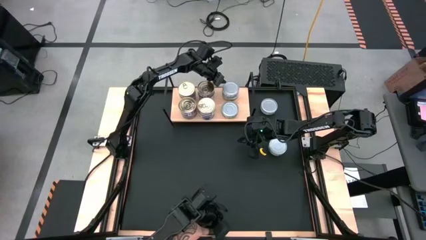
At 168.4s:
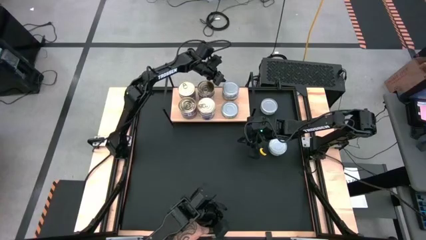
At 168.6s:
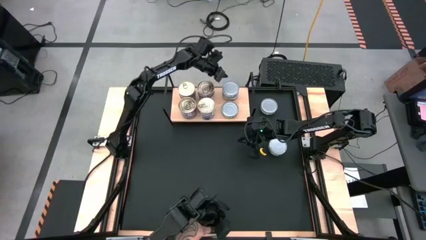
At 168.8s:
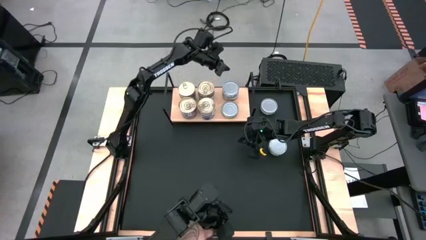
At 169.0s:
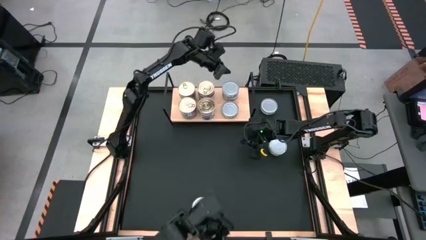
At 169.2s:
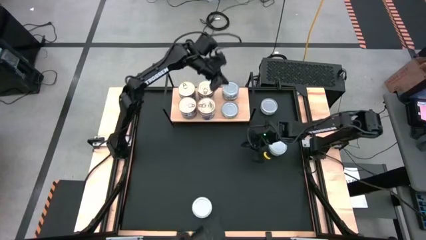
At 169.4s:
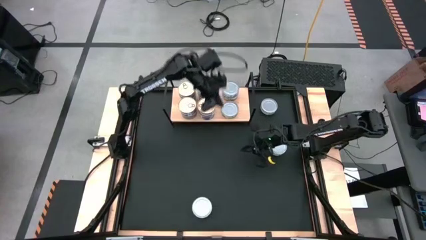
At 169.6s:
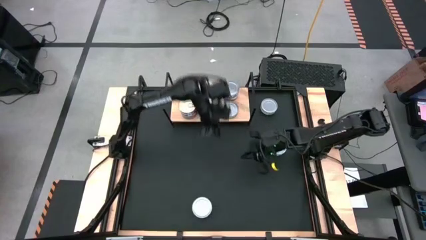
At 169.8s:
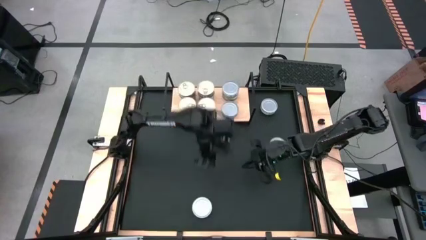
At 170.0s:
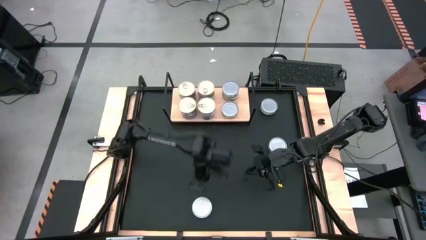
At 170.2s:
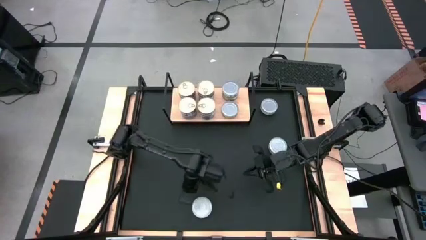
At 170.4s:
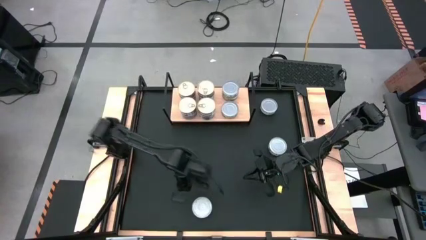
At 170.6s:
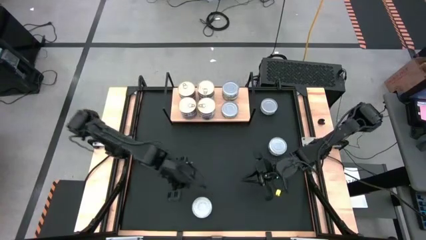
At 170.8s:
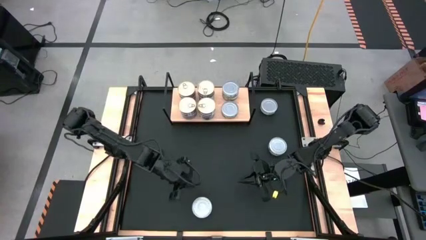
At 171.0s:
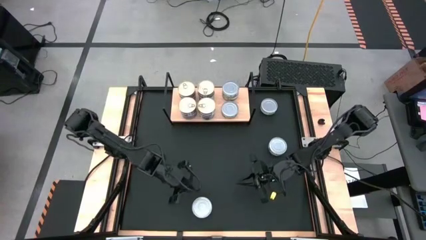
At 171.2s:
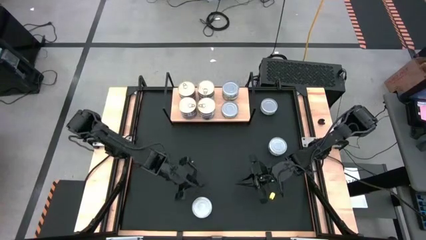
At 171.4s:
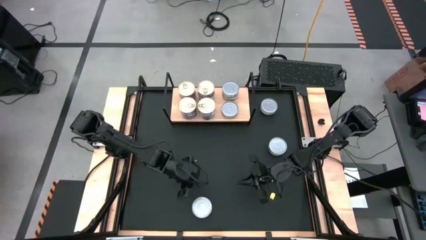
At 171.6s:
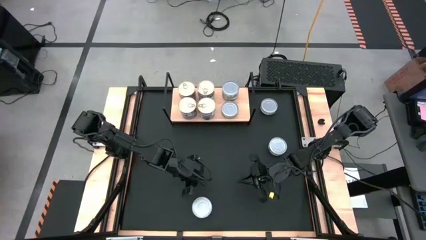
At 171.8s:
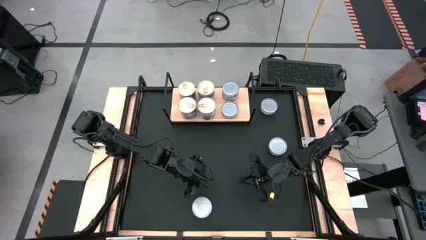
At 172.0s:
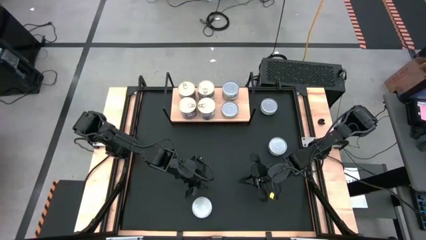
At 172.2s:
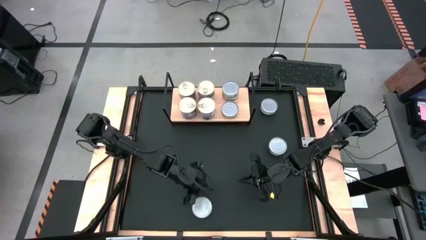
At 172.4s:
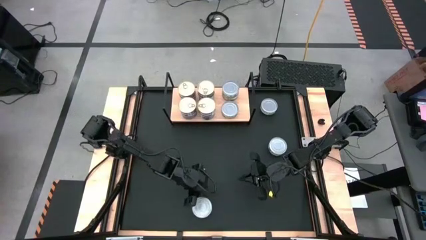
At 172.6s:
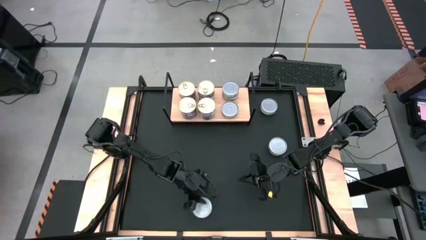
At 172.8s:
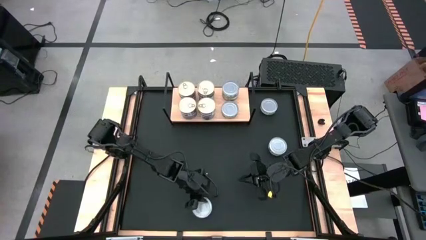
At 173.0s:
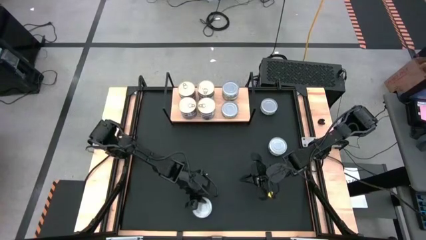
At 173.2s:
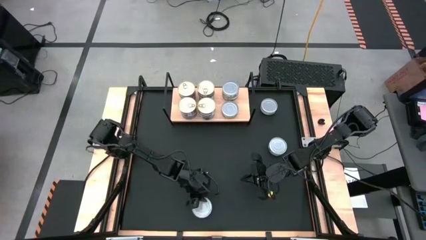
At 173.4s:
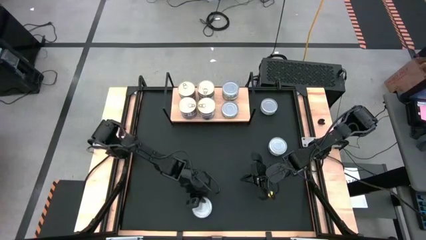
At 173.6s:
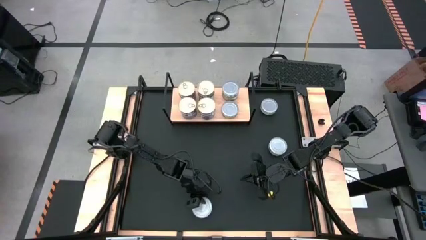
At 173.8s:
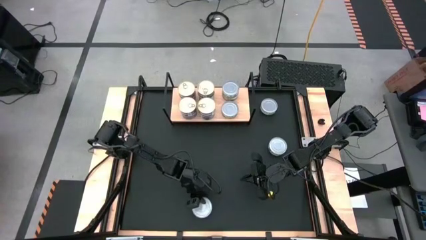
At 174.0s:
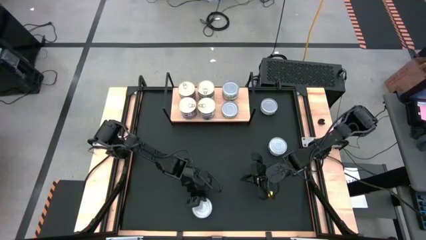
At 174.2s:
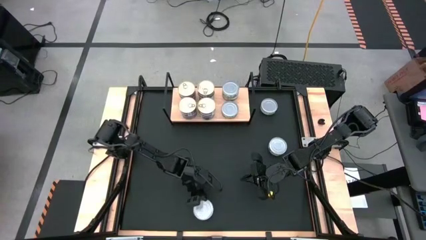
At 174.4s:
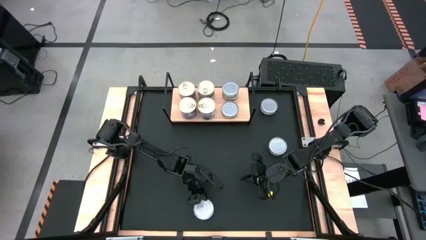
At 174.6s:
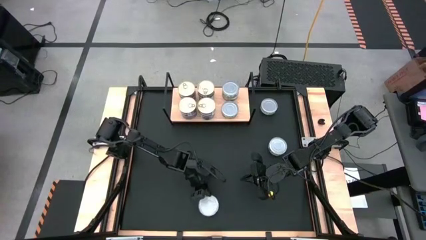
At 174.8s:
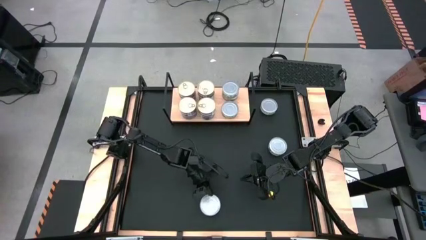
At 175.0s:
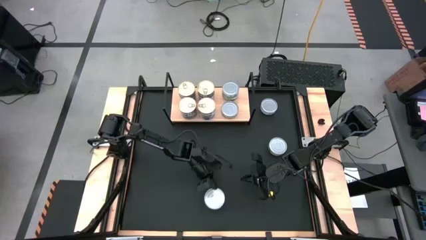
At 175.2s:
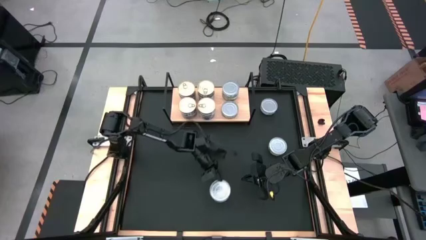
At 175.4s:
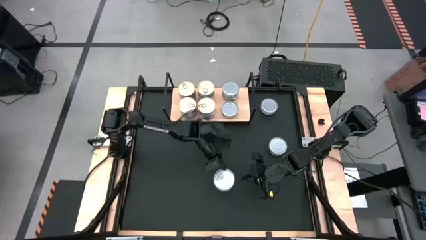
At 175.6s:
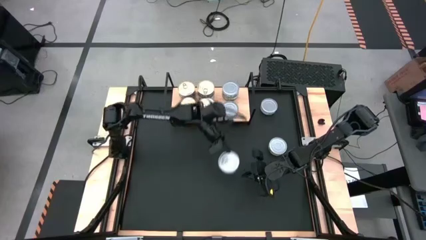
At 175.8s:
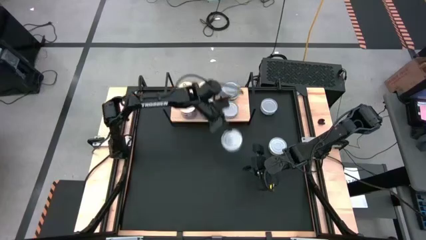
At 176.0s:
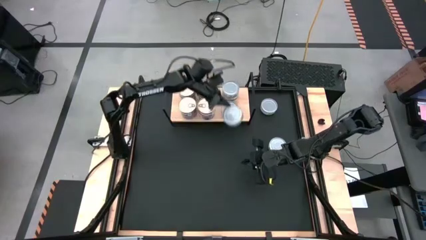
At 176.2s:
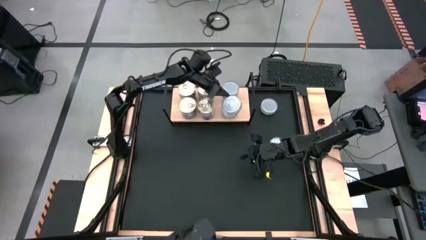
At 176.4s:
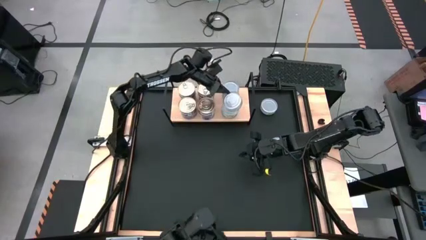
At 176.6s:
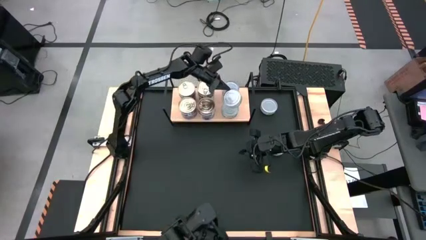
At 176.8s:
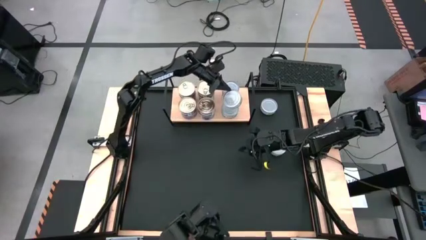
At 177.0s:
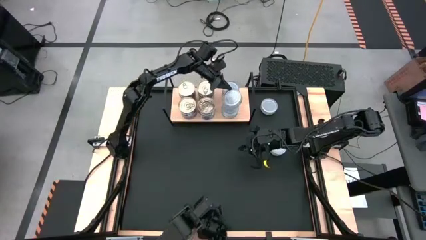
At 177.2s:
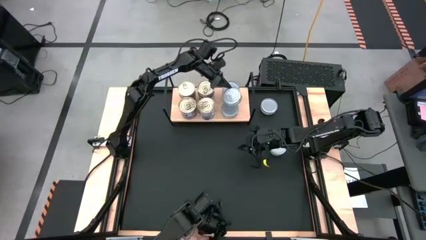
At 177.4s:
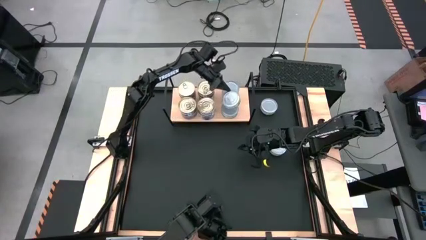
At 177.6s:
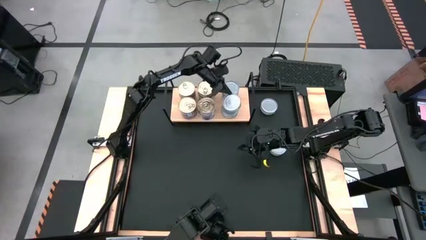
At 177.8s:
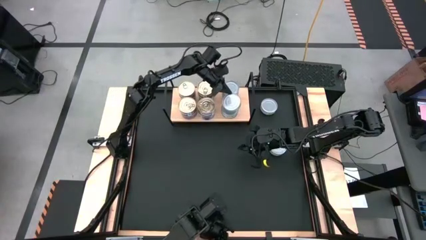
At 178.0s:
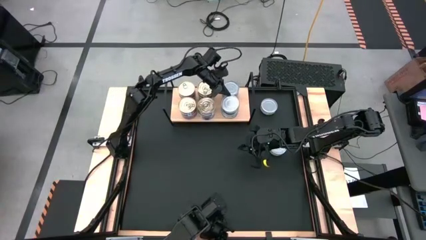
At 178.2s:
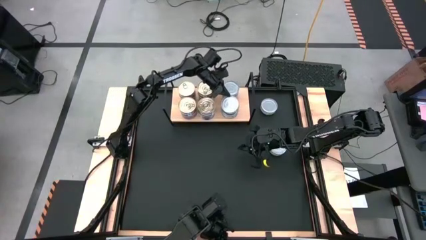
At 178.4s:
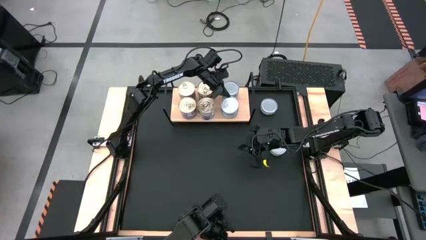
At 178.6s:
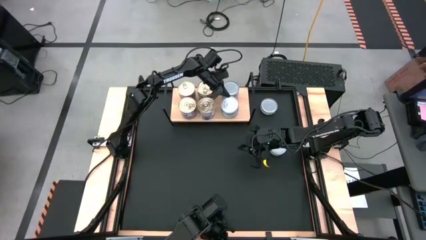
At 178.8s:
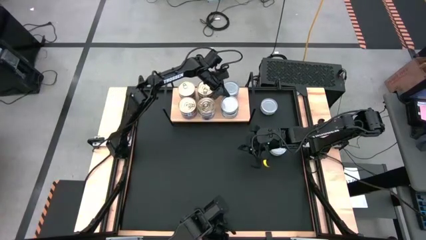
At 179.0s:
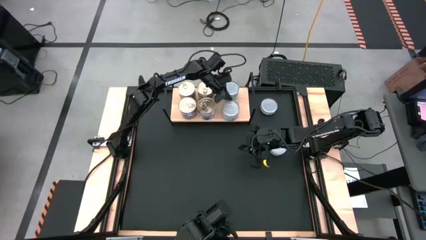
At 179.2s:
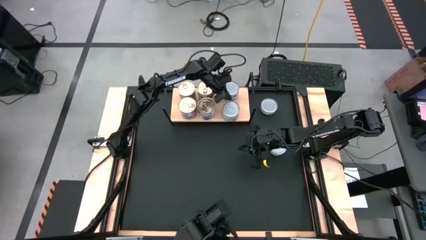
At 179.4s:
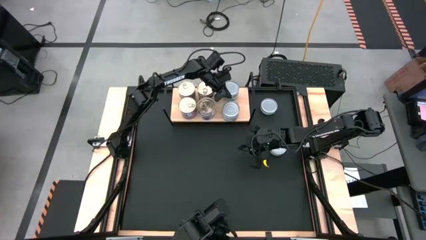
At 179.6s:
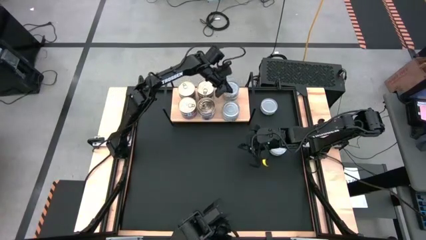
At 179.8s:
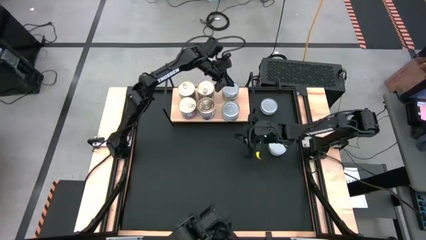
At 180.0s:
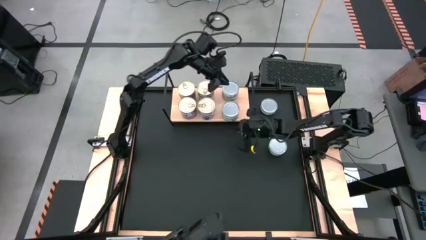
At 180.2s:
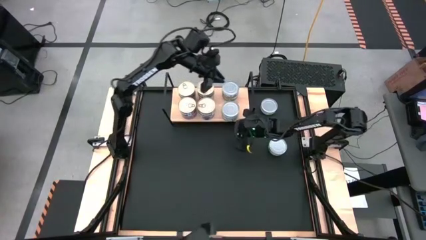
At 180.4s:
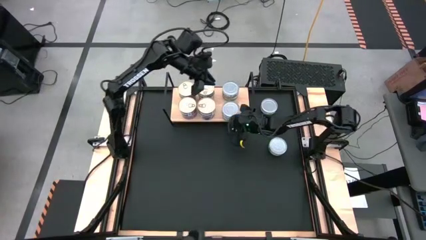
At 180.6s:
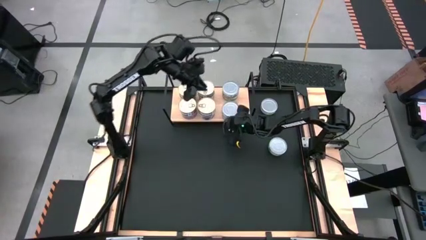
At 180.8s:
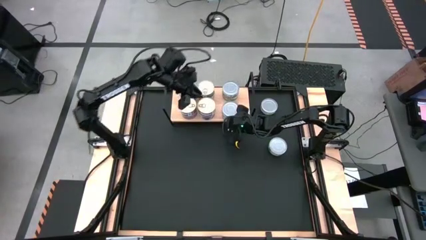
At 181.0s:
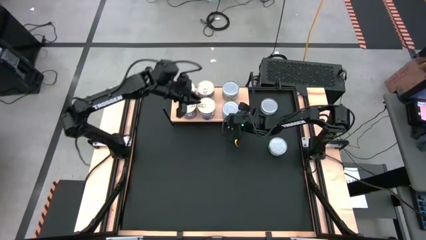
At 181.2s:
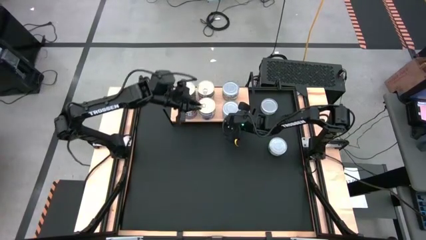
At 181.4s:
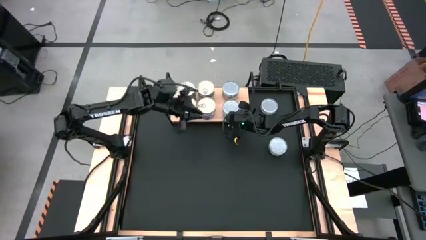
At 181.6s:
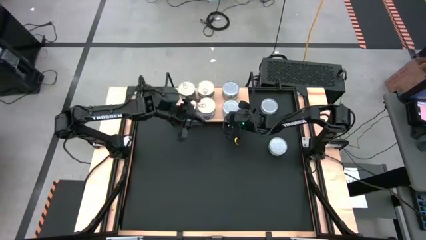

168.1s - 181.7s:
Task: Stack canned seafood by type on shelf
Stack the green tuna can on top of the green tuna can on the shelf

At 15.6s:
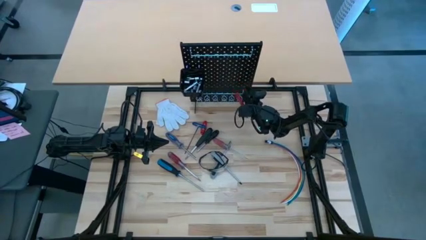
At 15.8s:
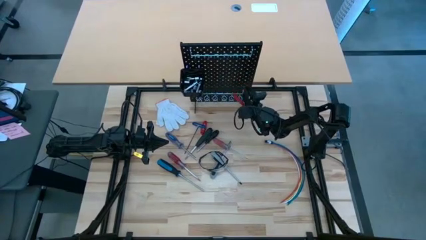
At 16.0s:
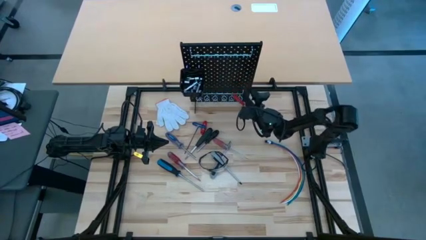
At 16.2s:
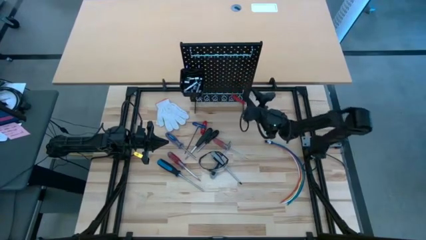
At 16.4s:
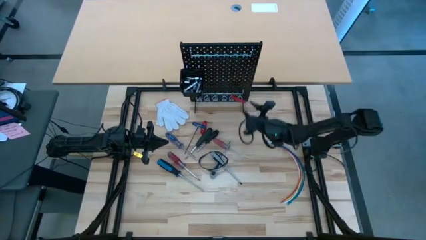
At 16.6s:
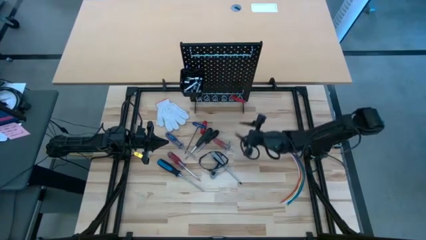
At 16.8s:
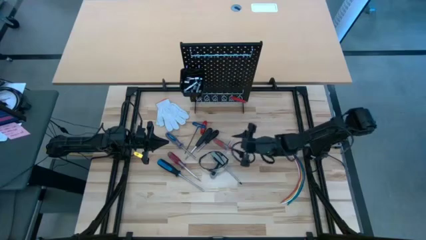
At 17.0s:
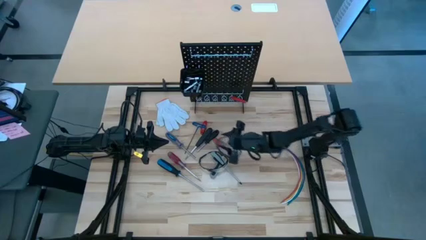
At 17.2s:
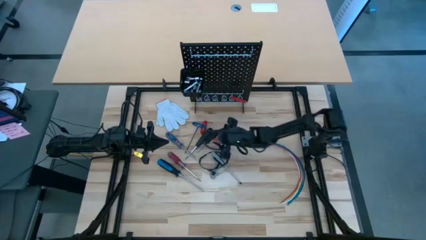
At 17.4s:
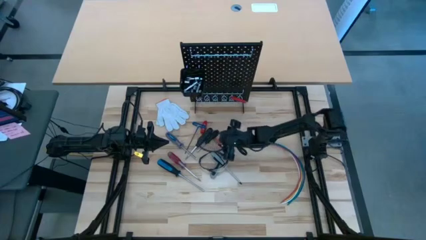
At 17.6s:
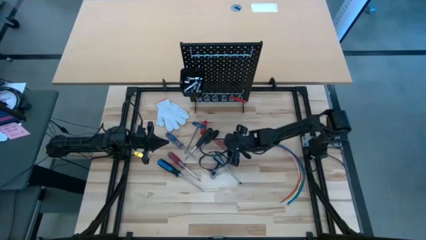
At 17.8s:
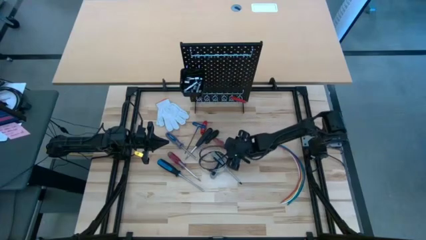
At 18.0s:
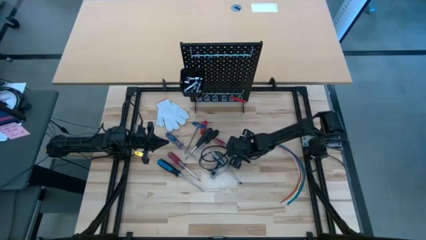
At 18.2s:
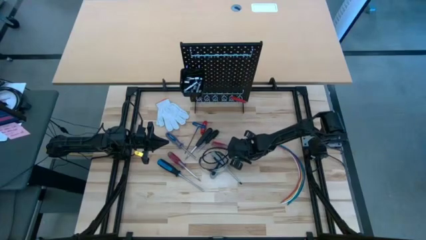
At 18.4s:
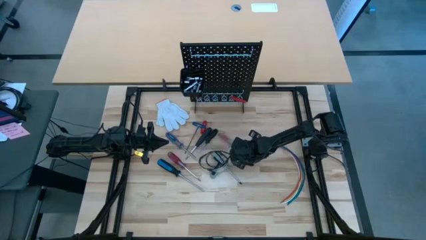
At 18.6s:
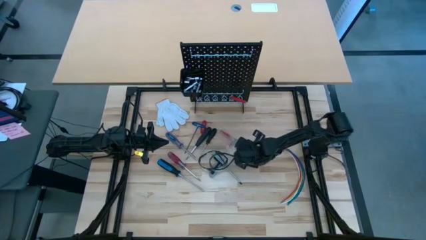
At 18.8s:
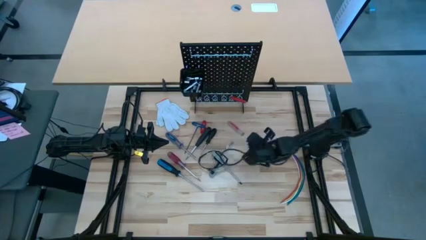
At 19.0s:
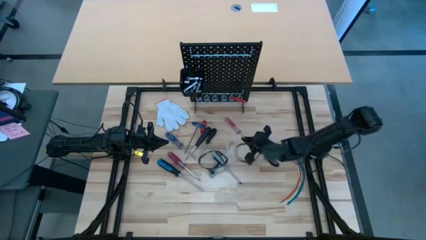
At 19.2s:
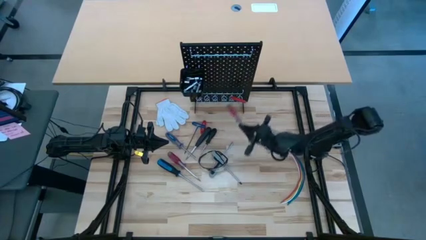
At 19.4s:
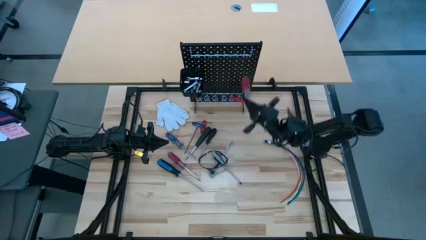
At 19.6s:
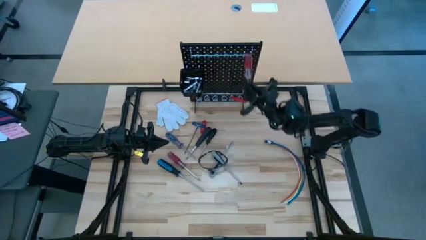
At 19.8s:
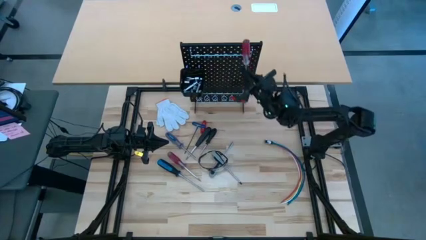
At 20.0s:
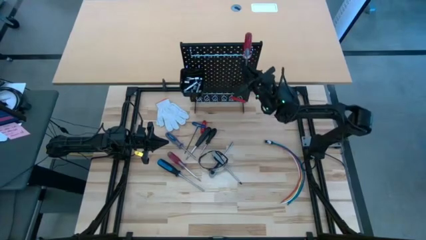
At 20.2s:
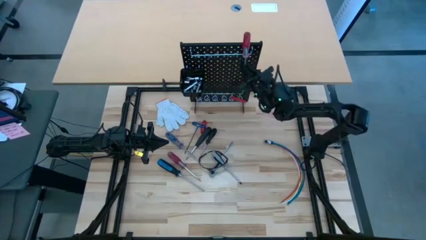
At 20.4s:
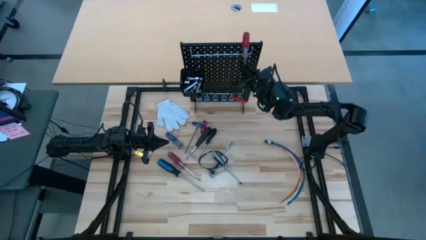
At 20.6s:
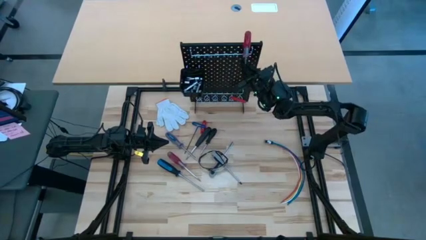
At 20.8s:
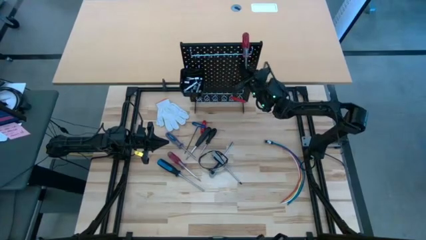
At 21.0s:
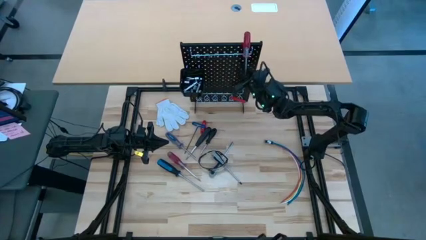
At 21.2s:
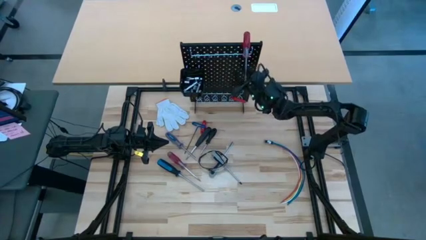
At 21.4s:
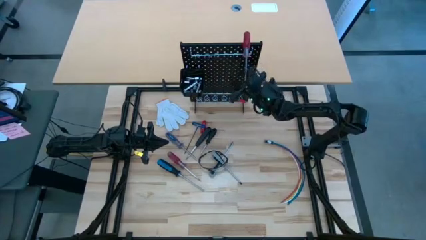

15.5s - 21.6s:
Task: Hang tools onto peg board
Hang the right transparent red screwdriver on the peg board
